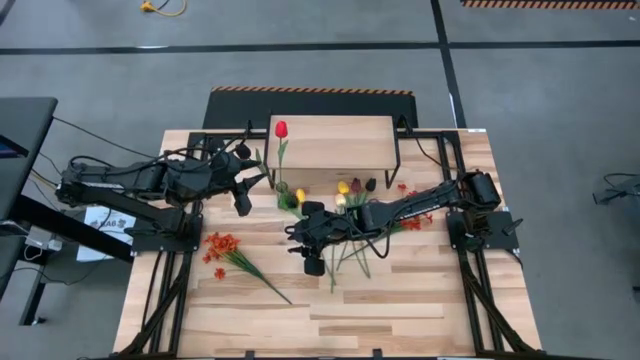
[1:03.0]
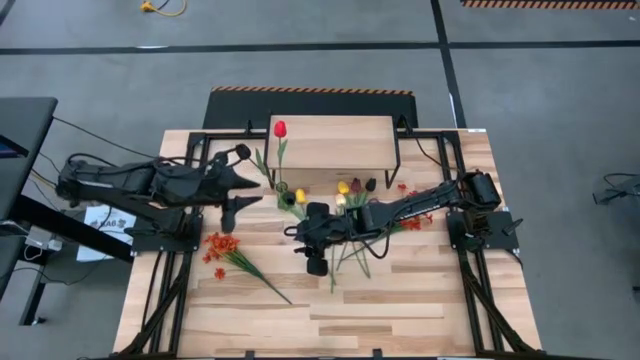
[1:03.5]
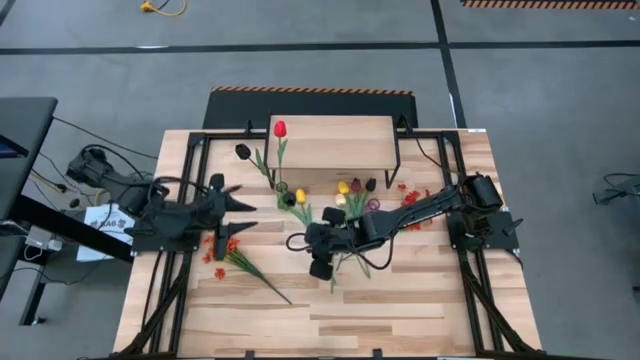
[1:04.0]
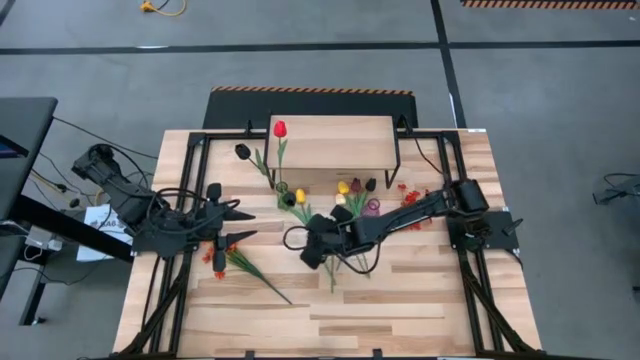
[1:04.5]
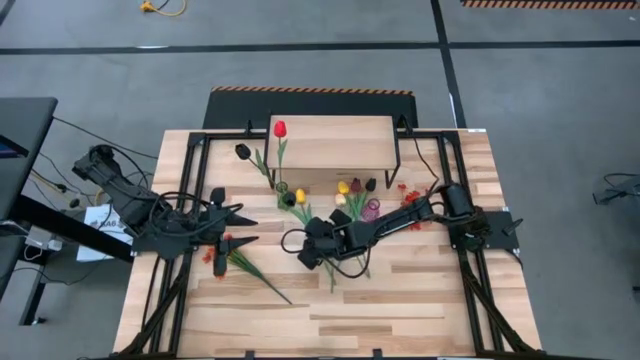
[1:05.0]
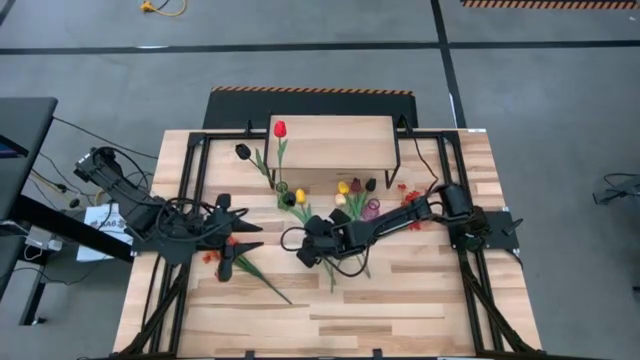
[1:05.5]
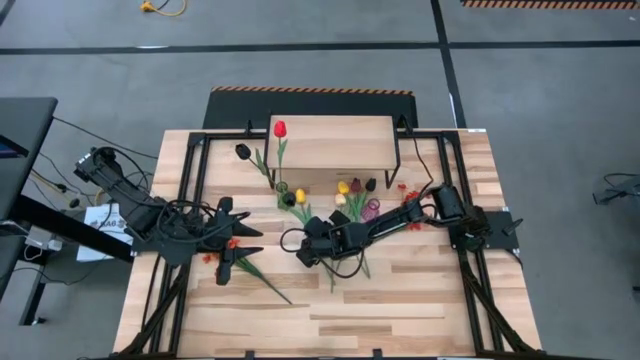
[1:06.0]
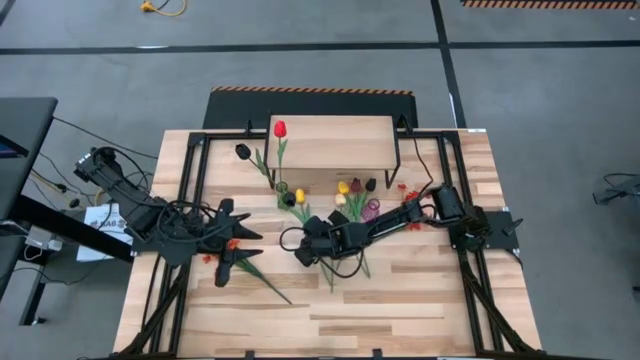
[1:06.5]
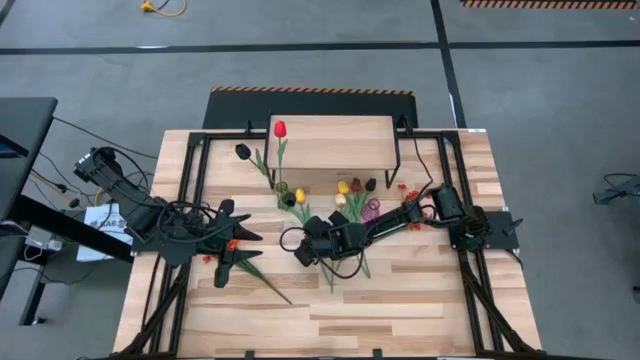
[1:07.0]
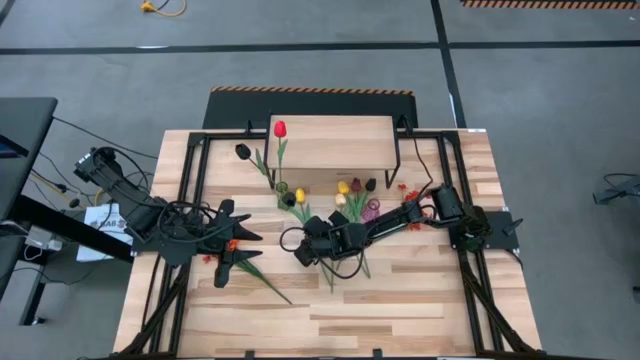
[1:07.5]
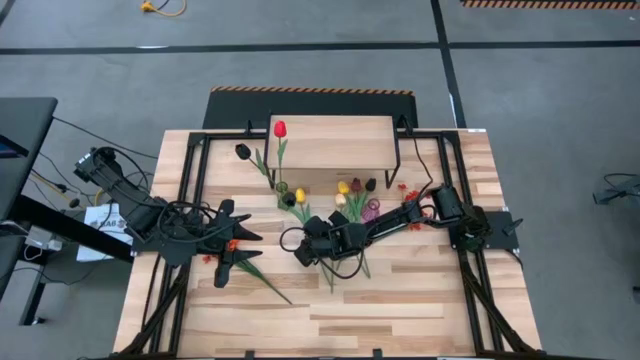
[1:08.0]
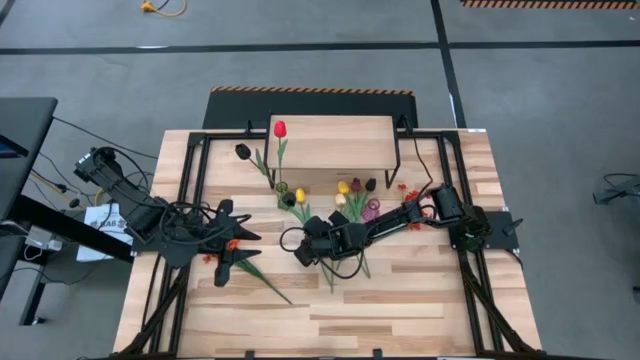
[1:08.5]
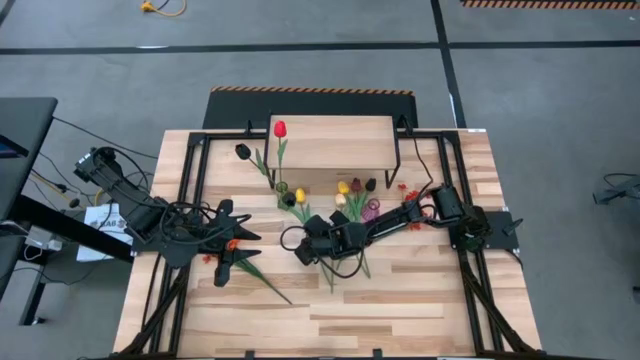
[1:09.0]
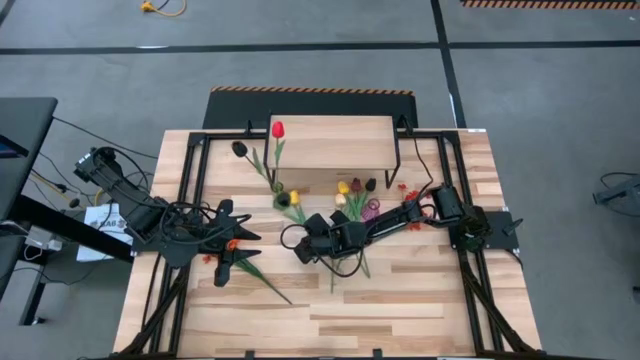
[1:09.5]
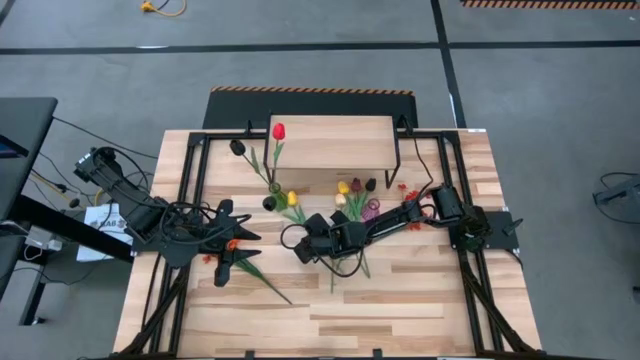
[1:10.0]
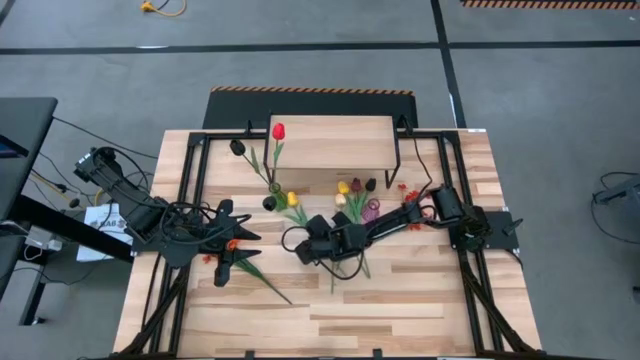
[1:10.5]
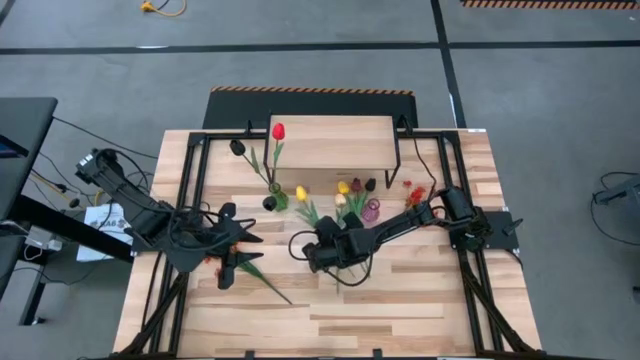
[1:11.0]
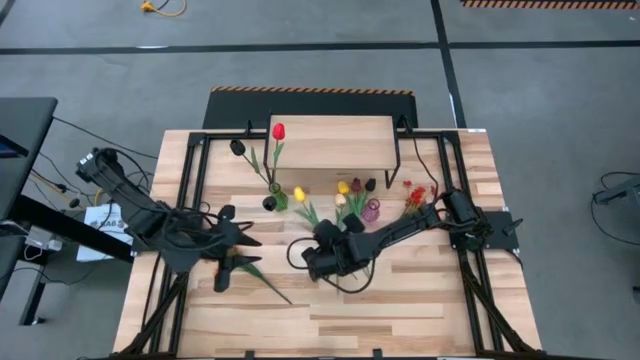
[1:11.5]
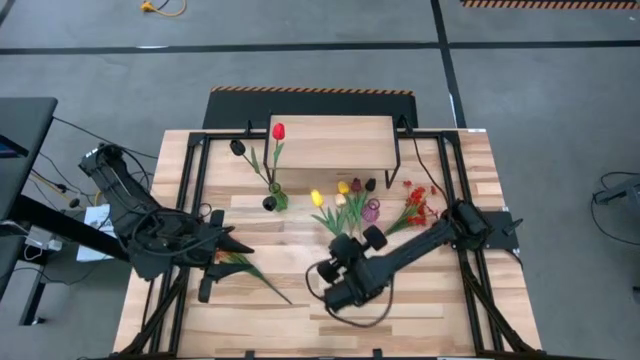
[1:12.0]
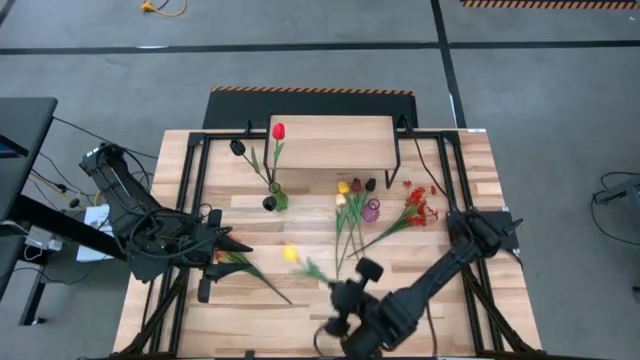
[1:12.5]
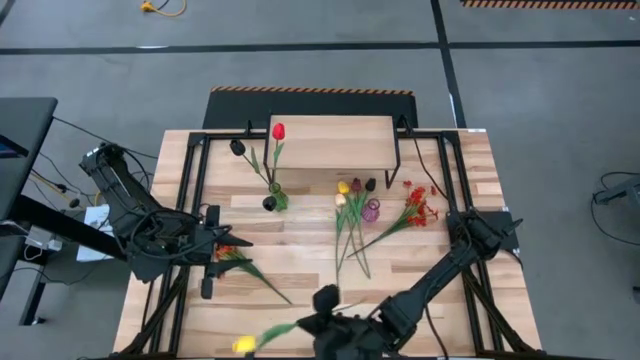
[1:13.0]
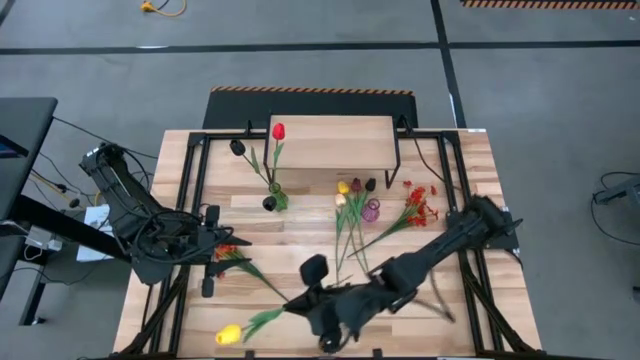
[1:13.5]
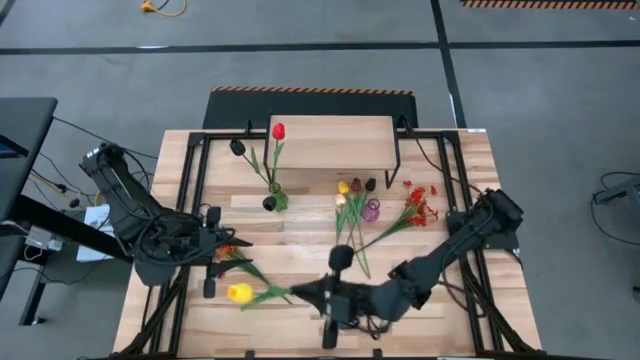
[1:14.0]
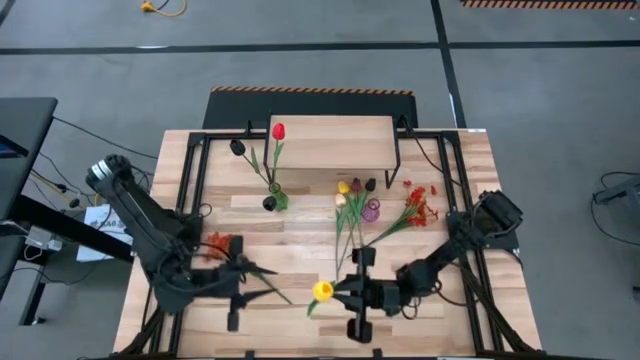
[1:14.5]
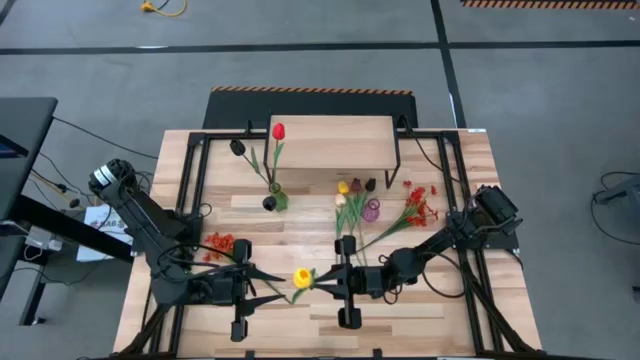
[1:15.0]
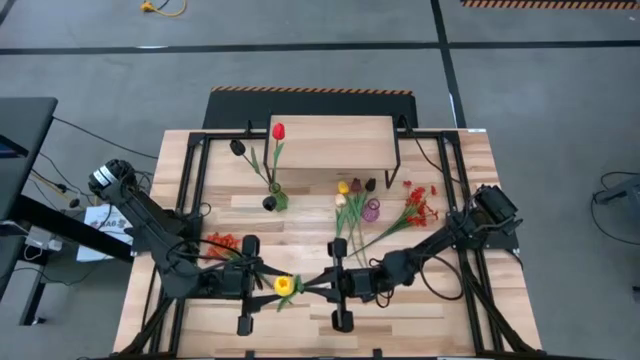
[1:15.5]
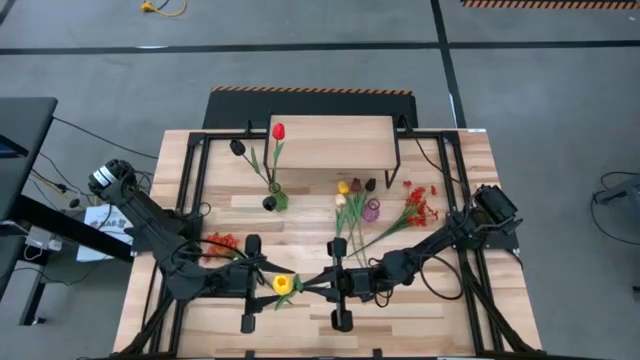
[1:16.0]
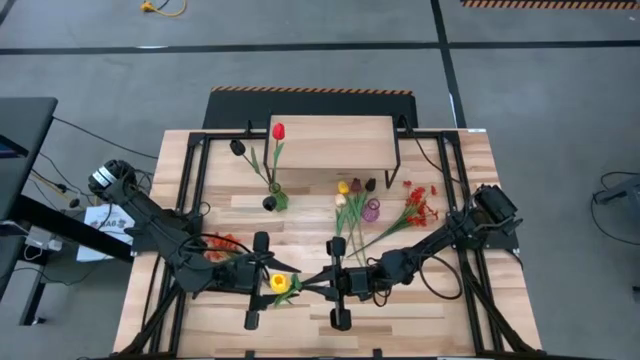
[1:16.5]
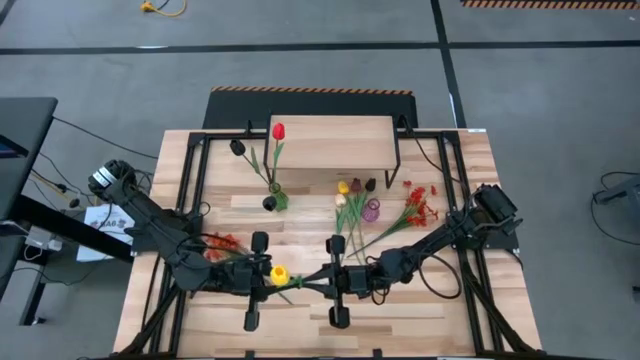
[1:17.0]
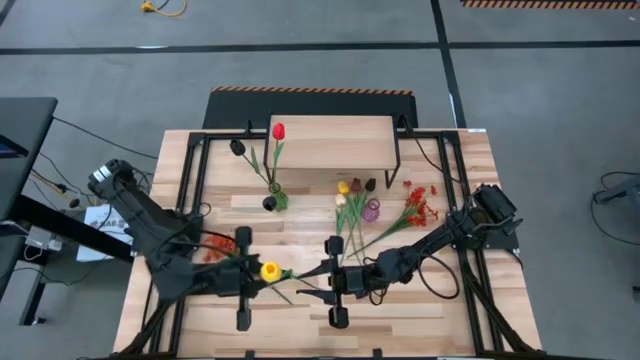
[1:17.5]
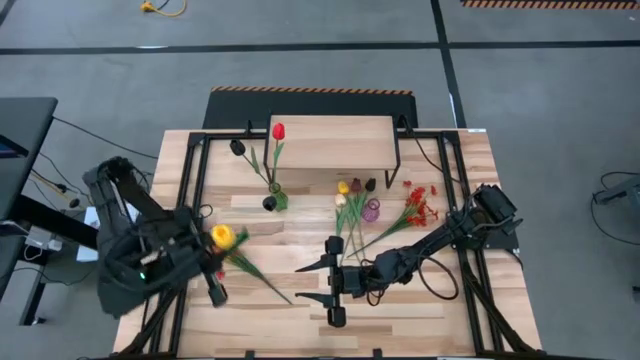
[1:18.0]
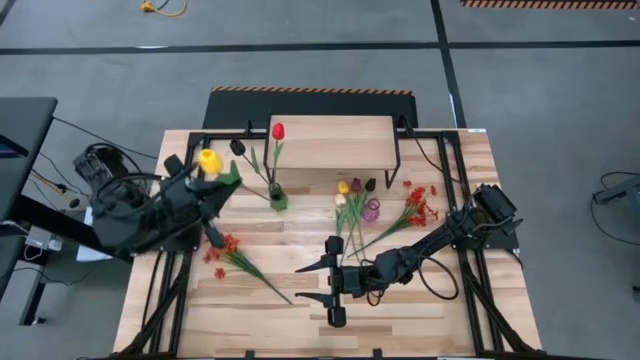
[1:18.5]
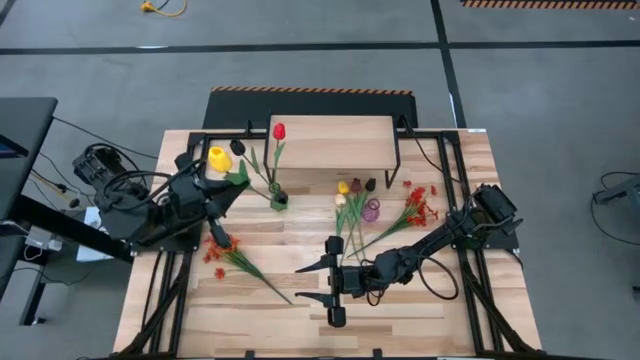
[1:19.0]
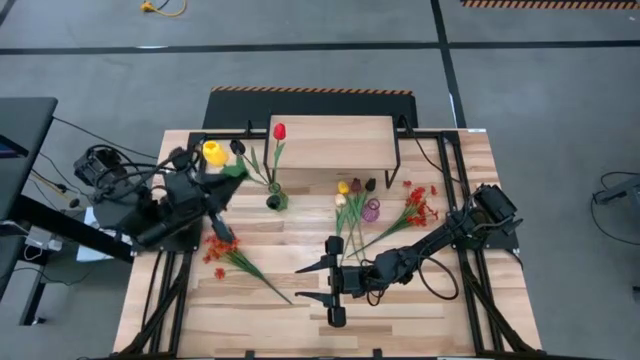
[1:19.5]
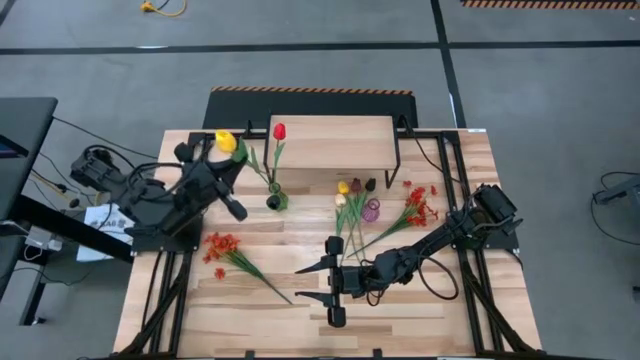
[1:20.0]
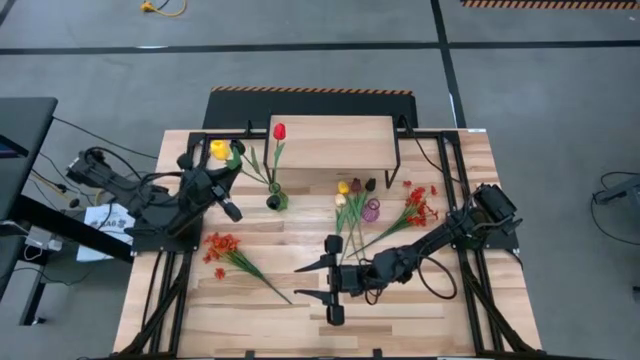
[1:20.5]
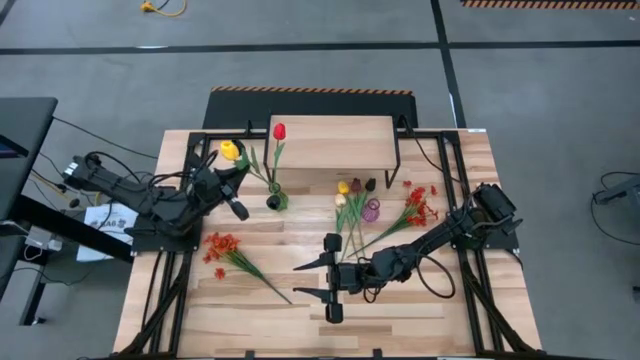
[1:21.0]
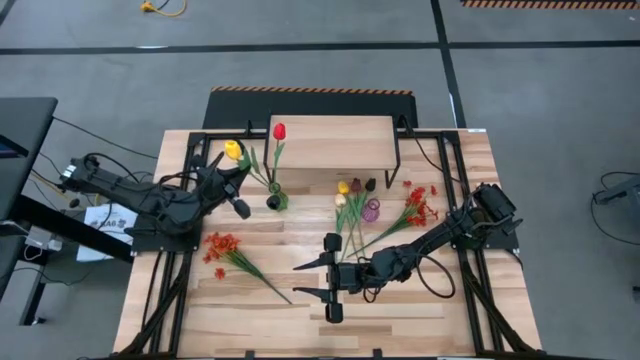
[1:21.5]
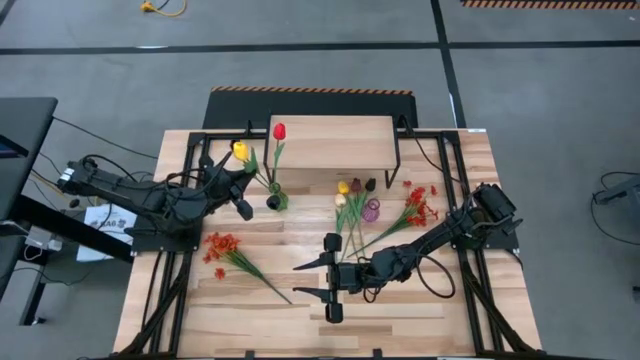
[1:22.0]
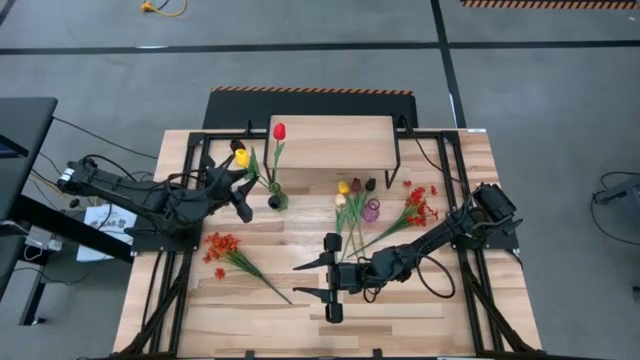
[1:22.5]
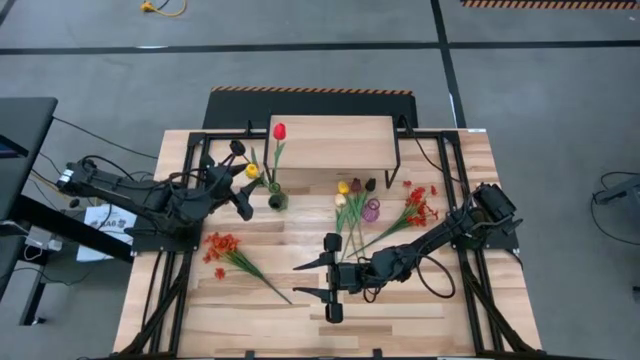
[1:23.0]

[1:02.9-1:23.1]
Task: Pick and place flowers into a vace then onto a shelf
Put the left yellow tulip into the green vase

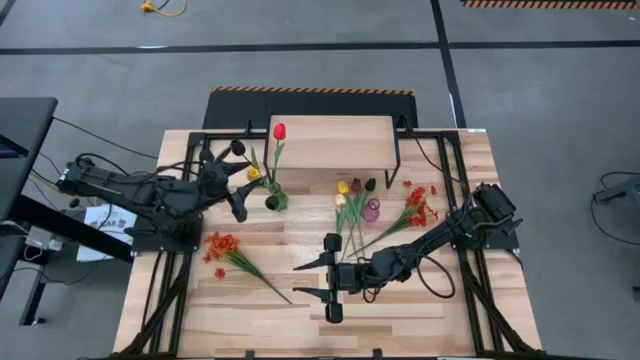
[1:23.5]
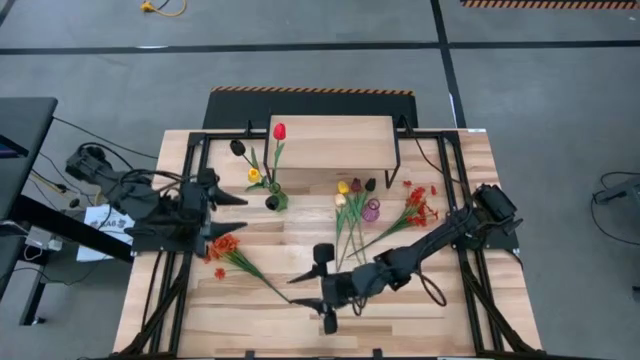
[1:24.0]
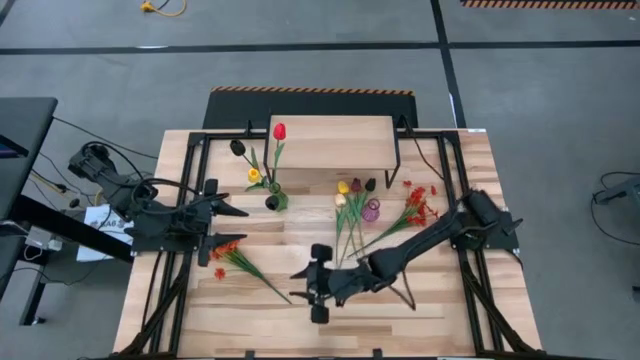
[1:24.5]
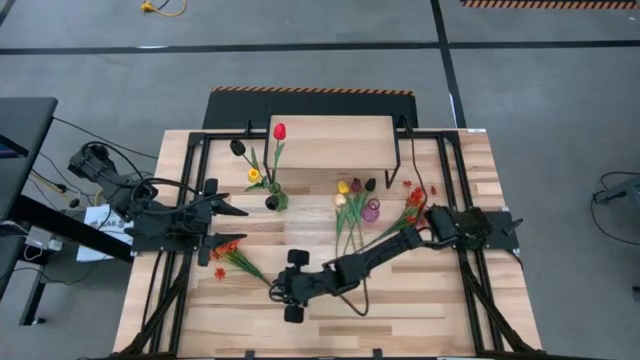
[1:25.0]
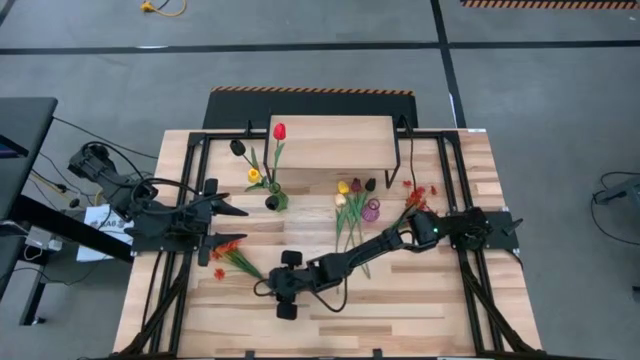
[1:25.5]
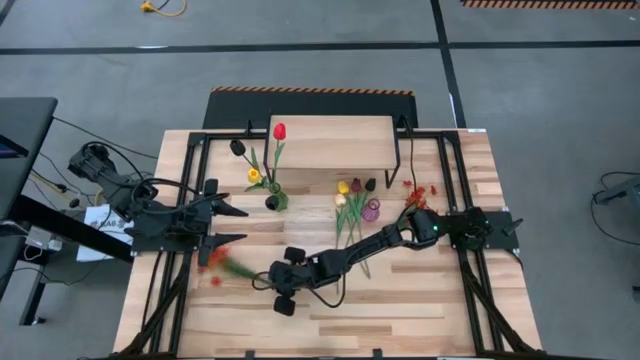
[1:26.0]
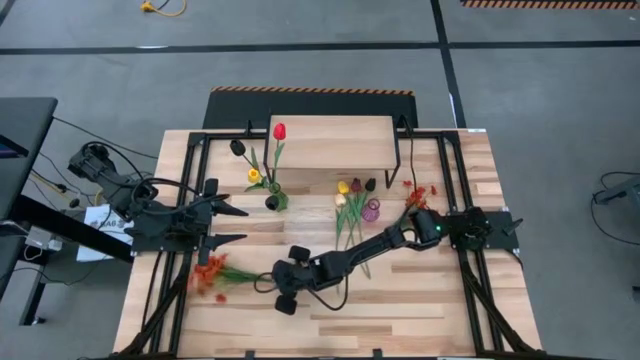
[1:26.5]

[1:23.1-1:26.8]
Put the left orange flowers into the green vase
